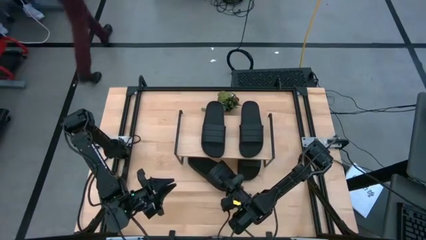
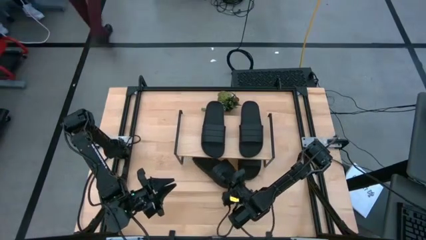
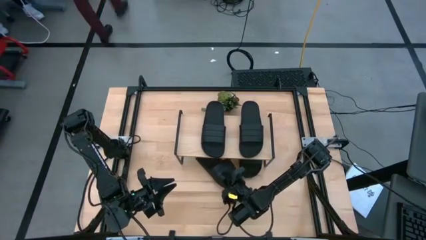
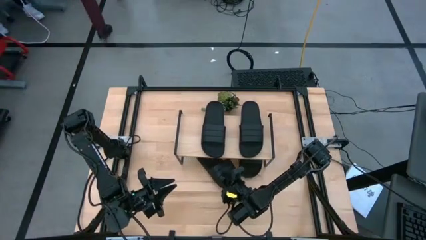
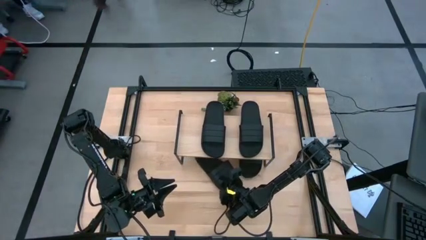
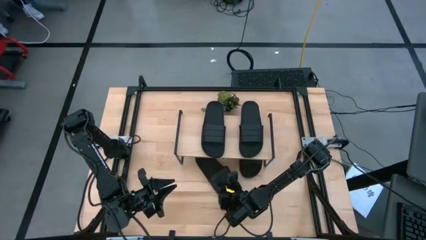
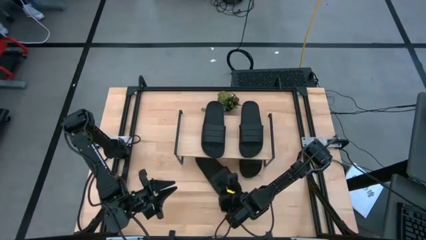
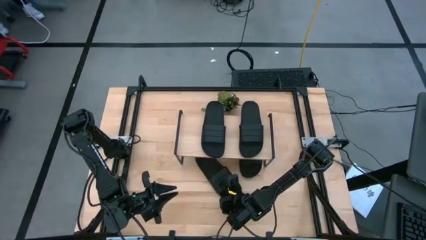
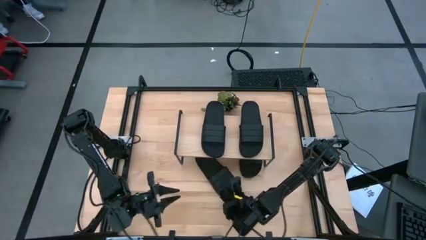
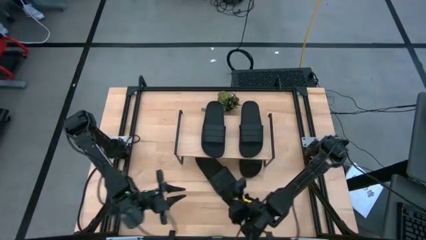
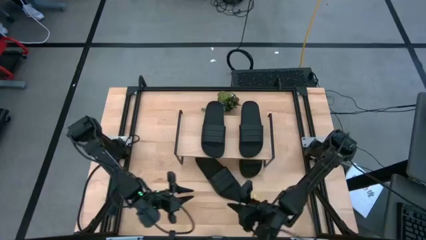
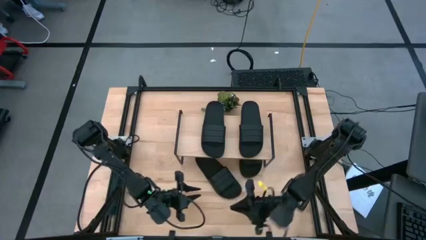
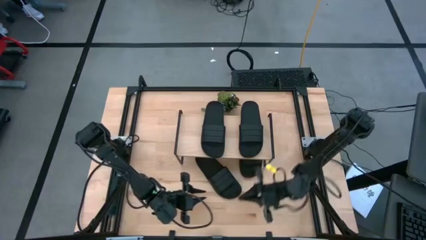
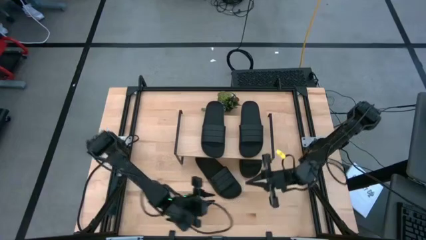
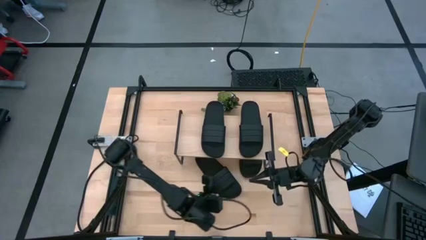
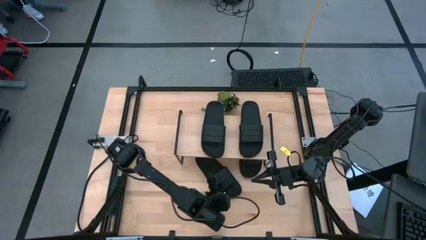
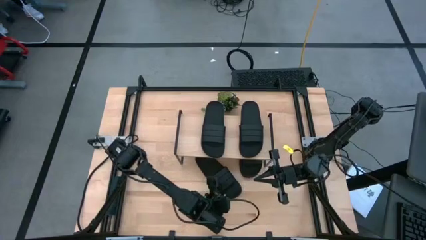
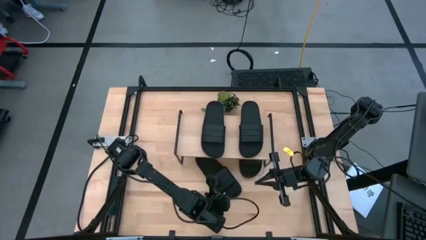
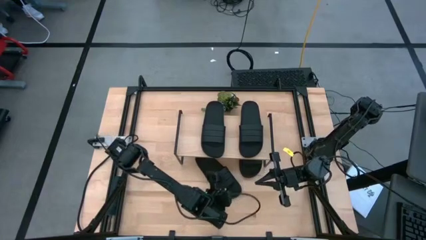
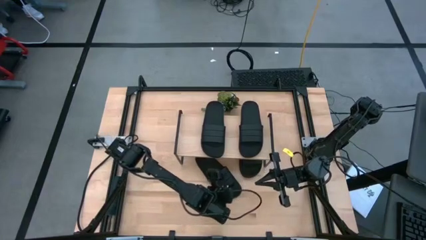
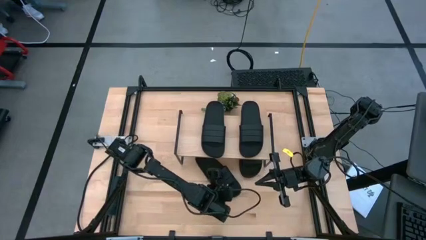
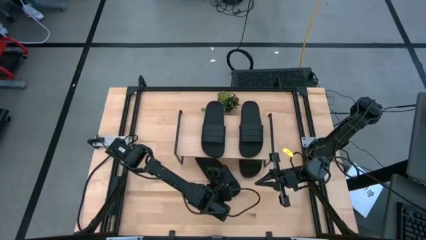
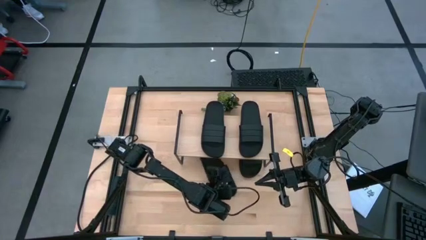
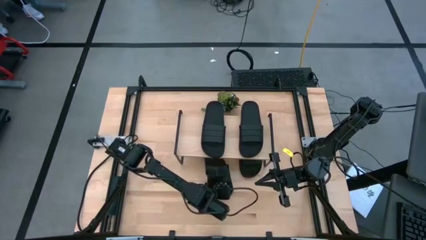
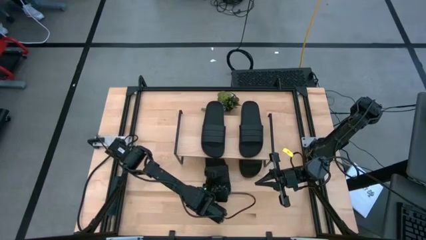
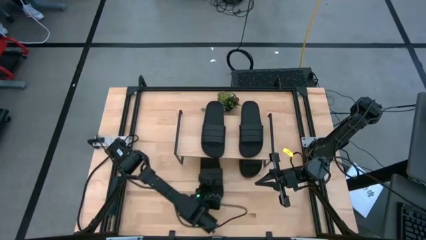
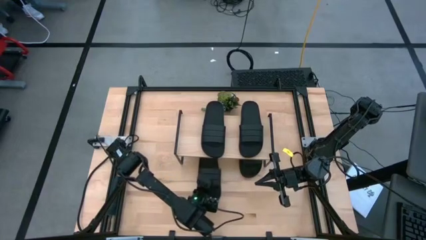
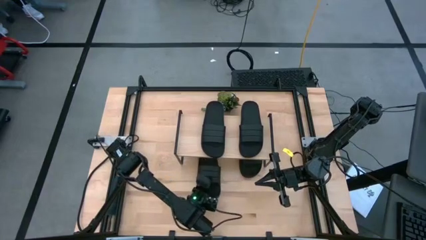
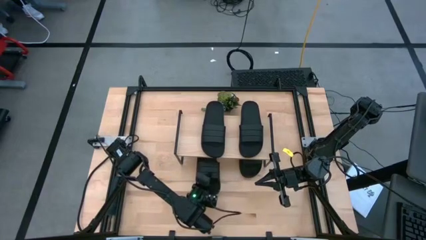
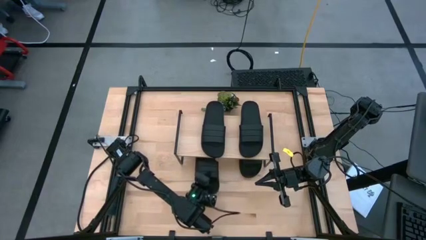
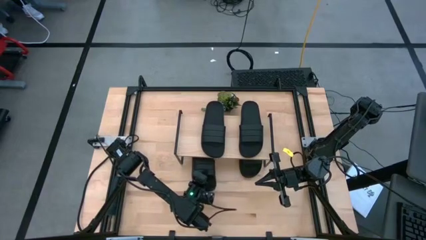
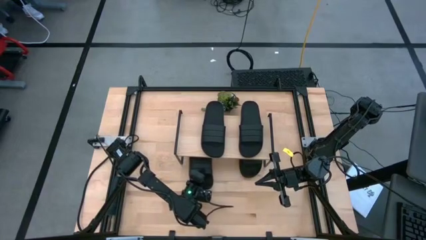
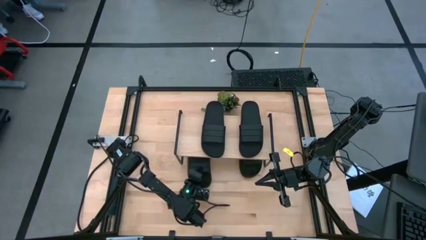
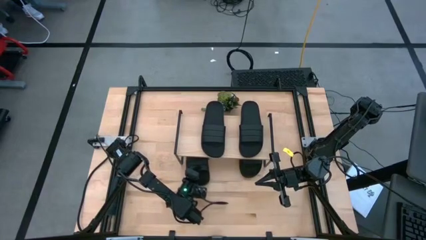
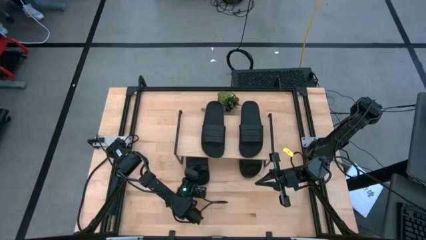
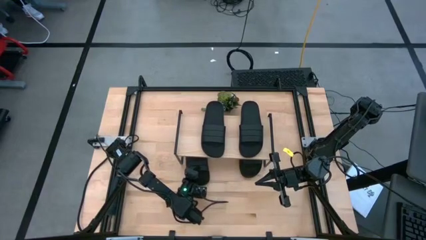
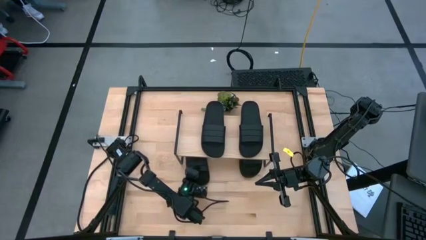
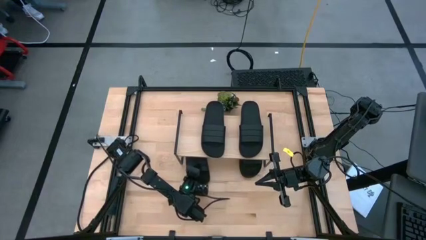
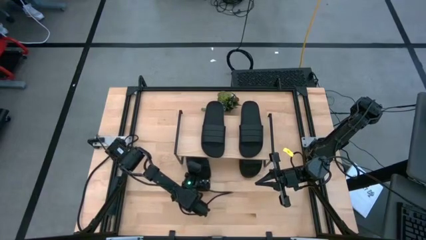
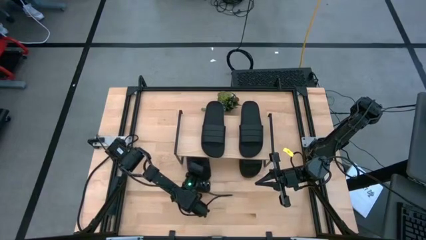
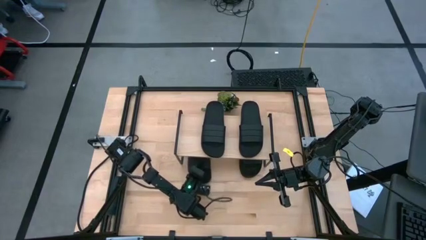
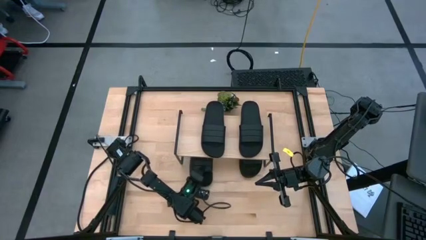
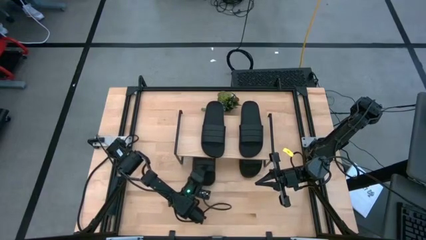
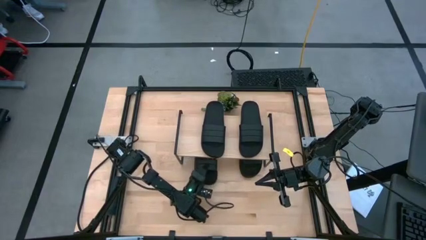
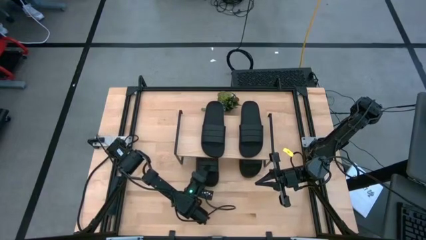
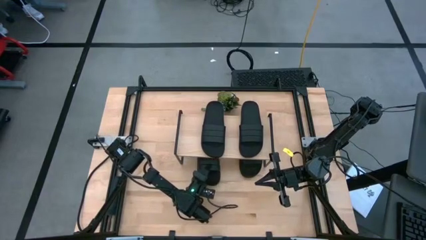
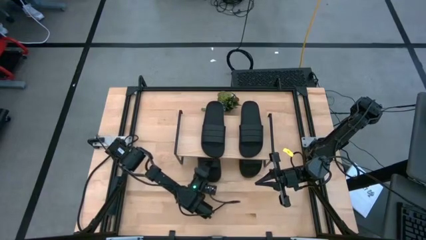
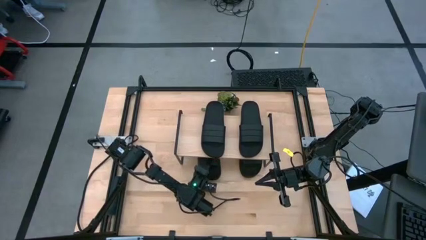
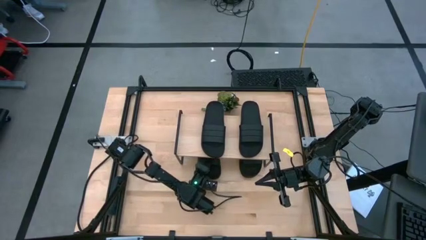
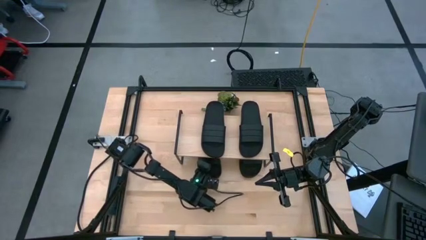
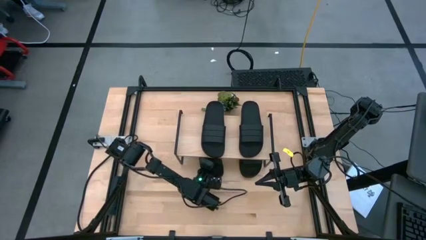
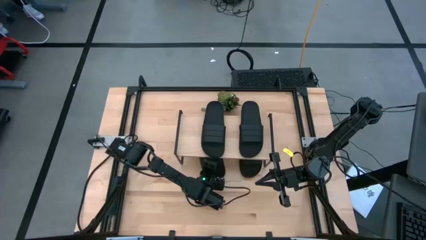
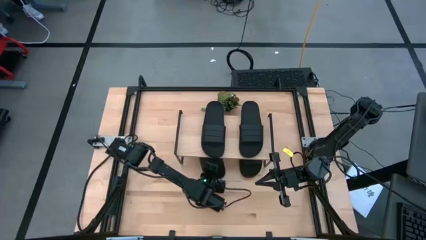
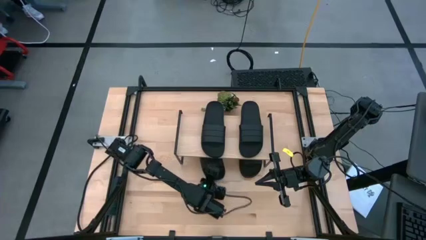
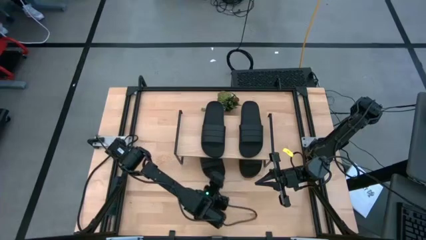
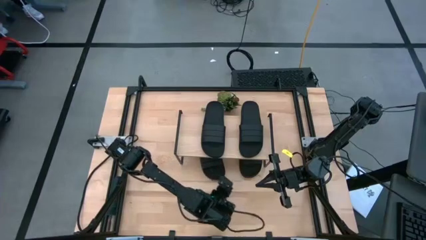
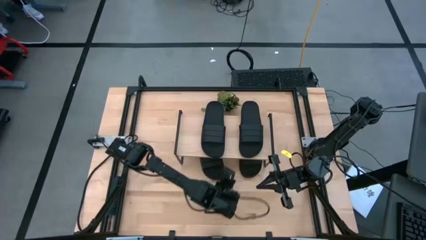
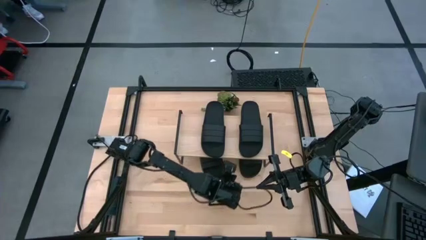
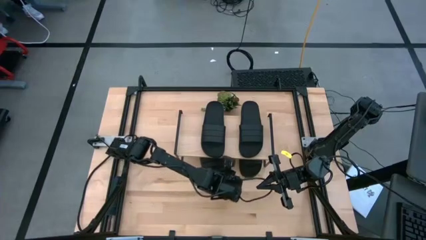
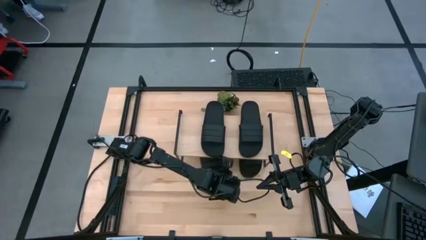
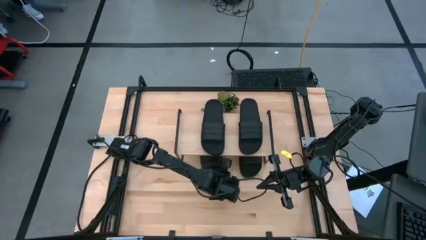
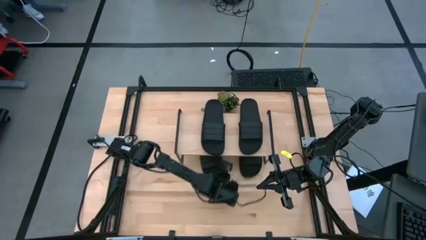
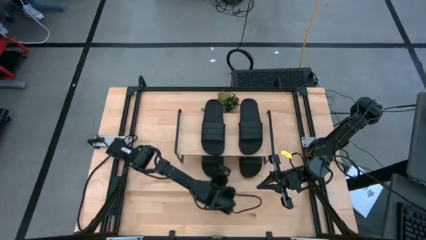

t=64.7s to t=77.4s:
Task: Pick and place slides into the shelf
Put the black slipper under the shelf
